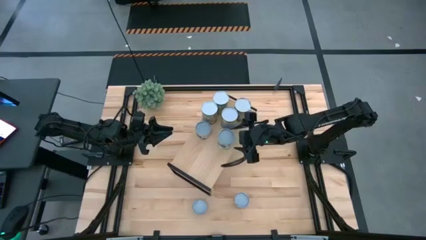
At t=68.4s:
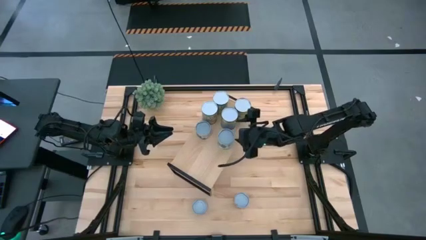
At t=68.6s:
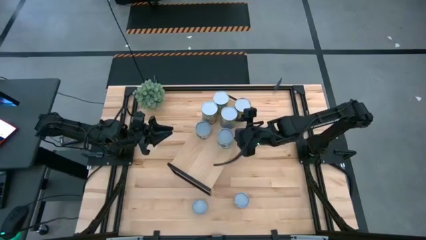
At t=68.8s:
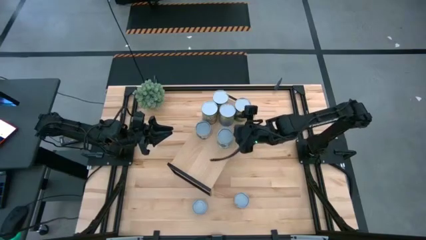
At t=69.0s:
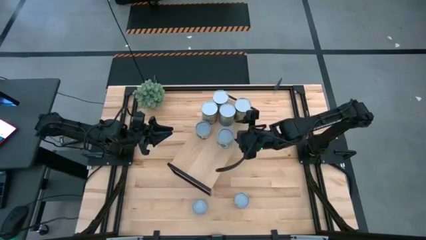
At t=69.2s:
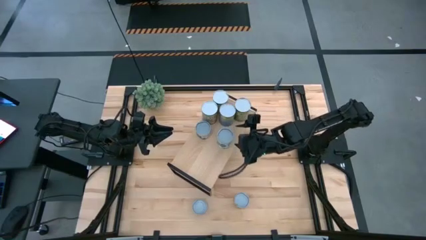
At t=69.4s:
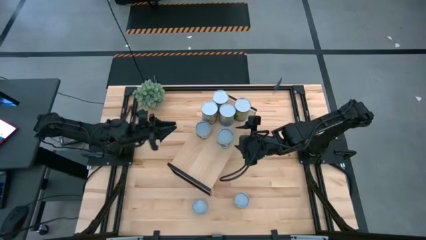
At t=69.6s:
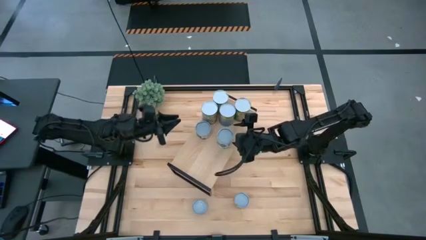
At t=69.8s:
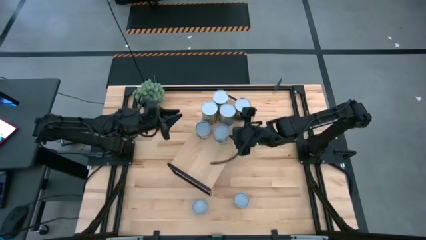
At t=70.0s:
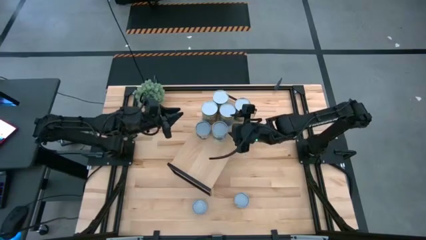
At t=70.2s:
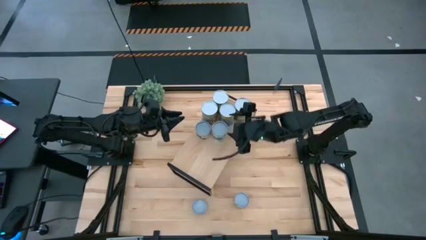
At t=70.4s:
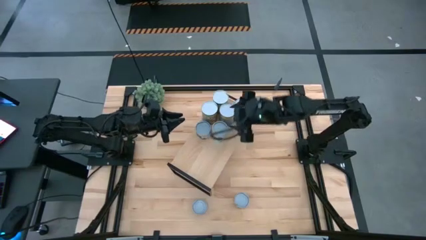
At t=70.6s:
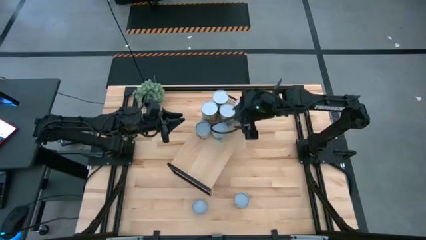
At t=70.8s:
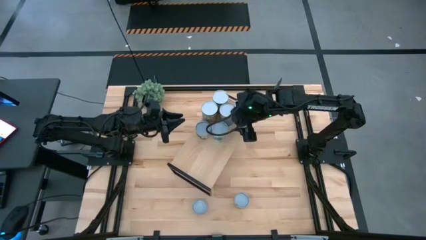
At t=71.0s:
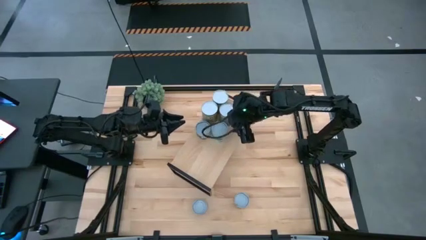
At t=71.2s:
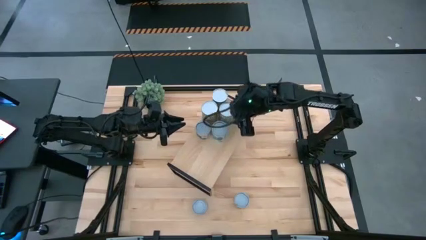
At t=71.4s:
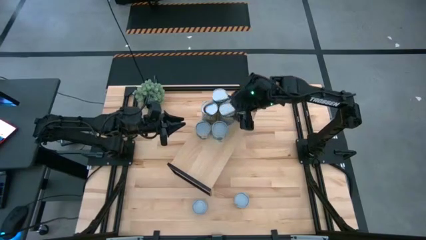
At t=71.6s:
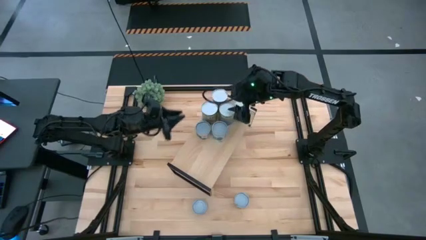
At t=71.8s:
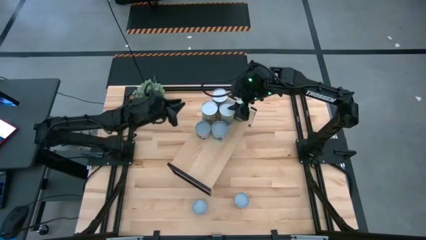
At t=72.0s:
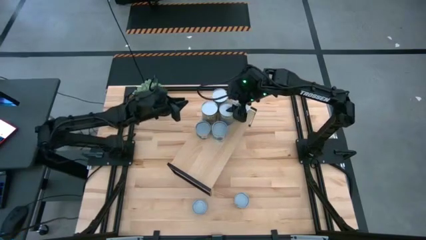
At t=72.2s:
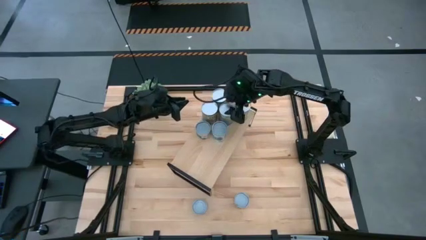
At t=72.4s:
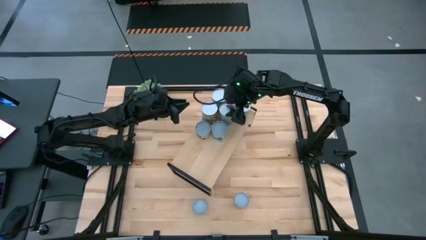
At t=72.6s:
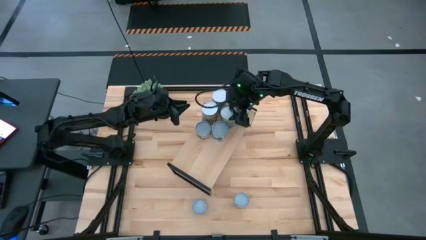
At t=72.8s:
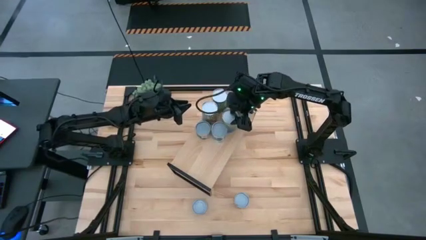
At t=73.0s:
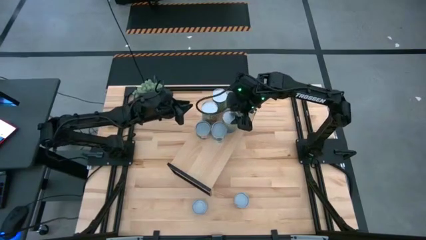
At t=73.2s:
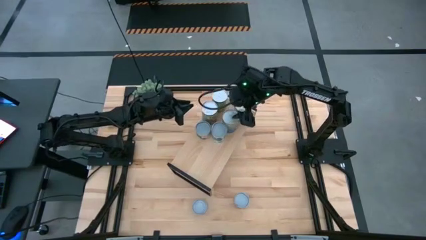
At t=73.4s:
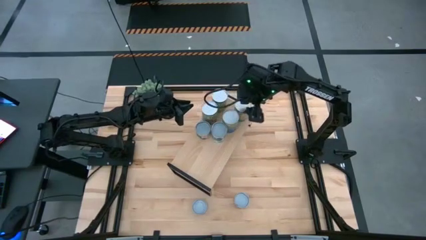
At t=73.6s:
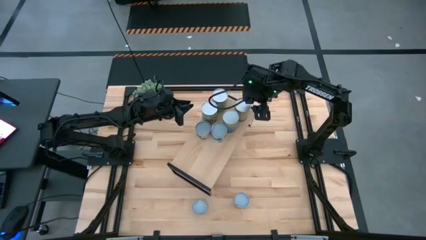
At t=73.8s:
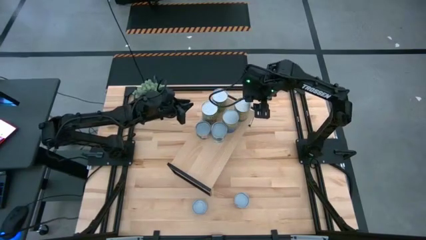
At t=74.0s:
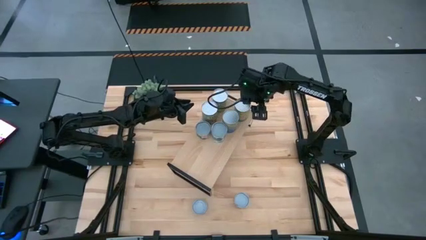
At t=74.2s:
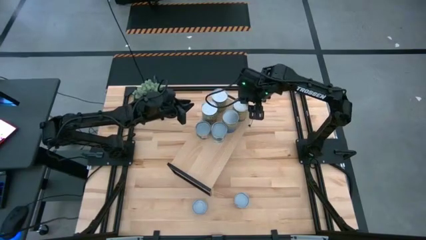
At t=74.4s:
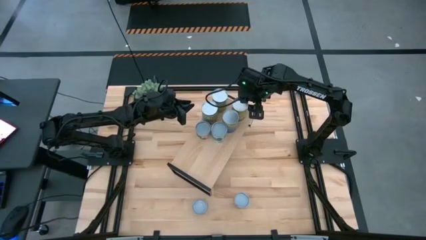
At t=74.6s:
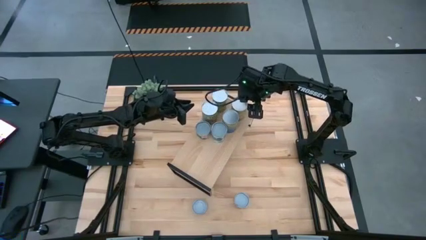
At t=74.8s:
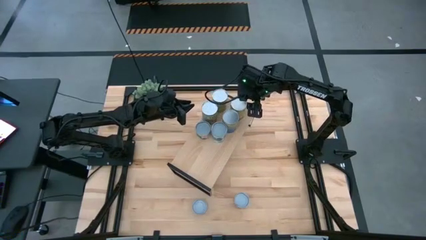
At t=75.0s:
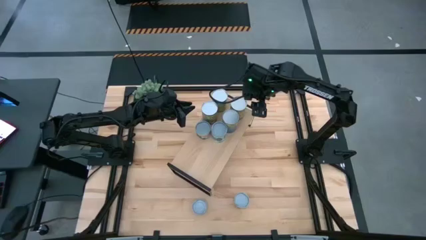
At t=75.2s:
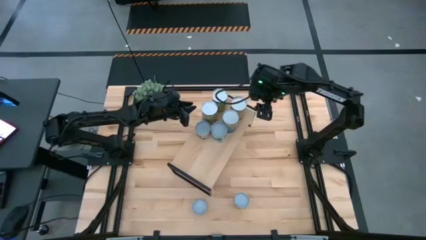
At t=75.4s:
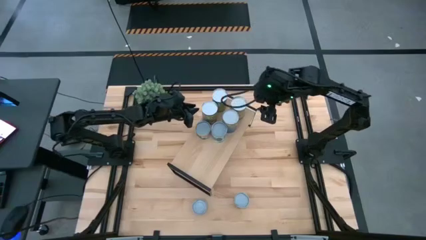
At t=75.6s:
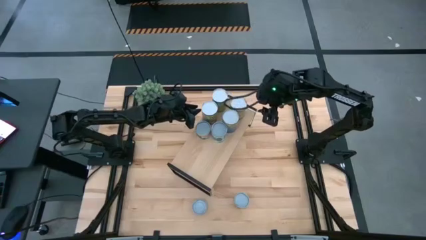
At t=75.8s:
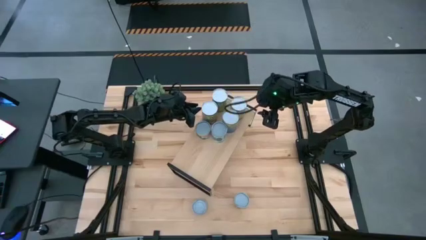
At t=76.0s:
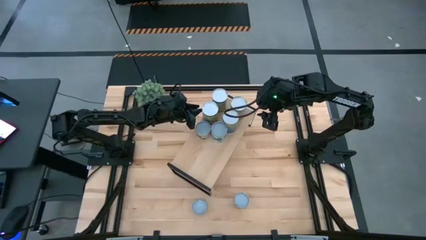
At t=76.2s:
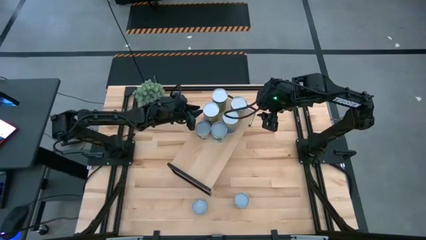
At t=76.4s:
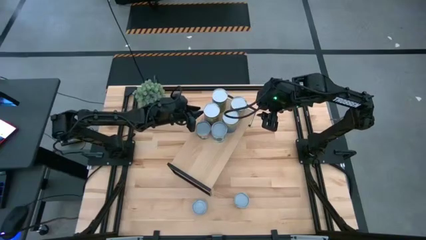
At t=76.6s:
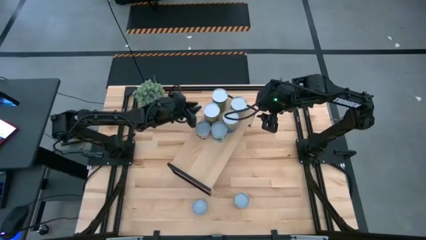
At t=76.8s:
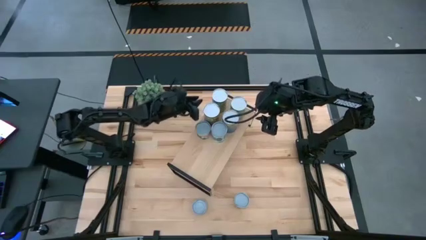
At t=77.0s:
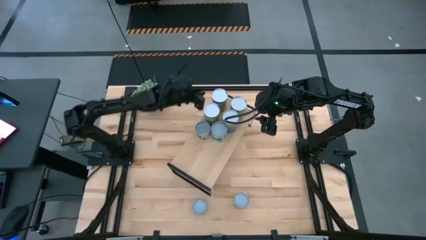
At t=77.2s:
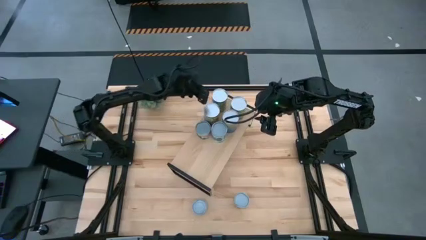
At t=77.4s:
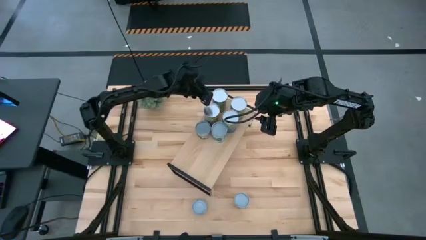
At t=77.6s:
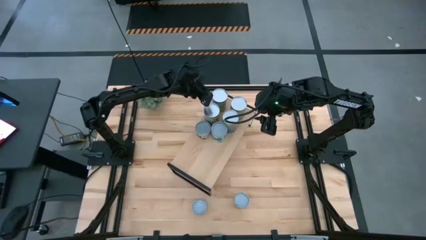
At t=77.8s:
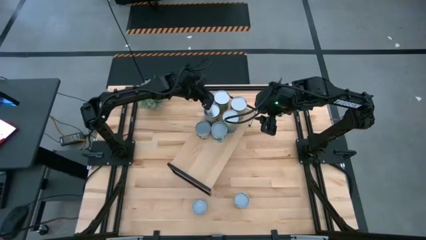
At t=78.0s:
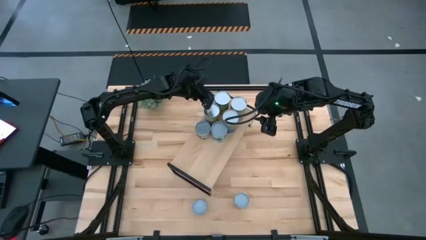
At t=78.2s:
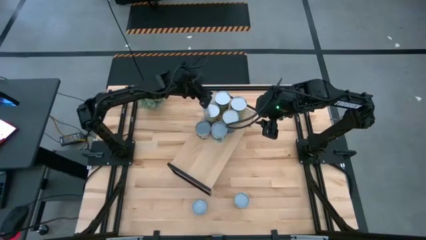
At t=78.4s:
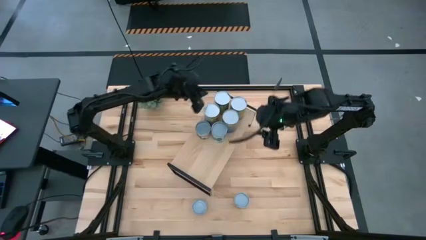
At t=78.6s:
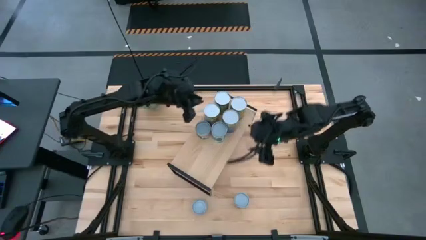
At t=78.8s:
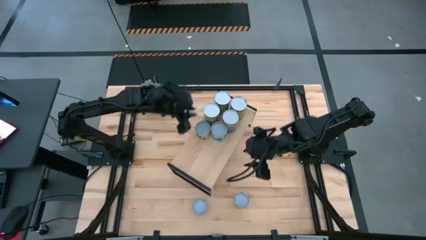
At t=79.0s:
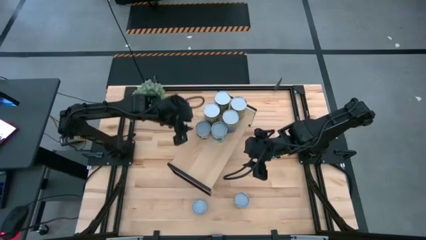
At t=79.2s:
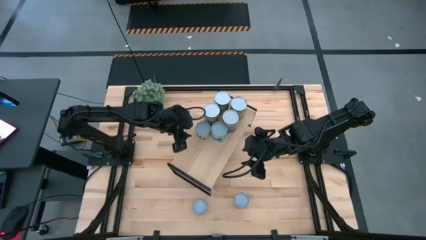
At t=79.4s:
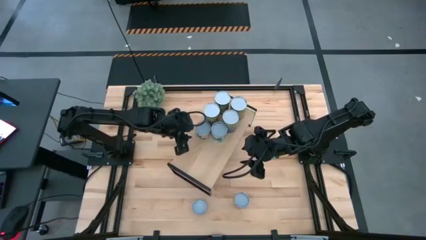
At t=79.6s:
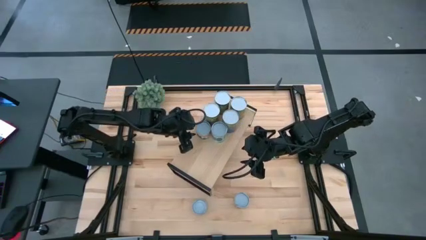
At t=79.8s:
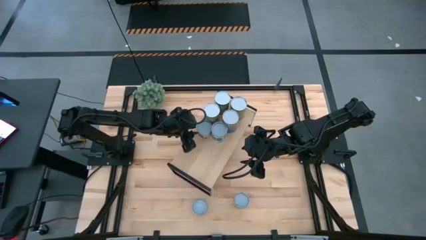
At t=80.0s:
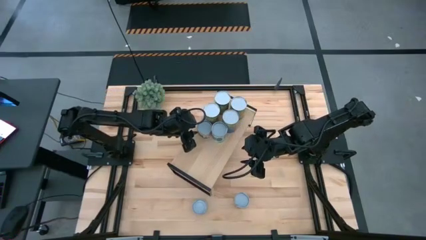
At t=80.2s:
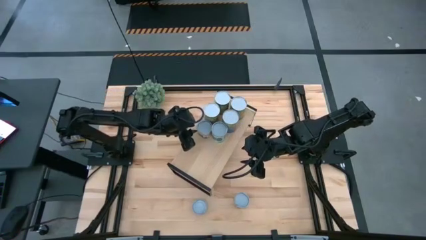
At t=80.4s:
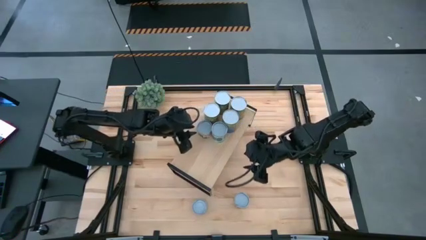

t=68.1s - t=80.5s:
Task: Pick and place cans onto a shelf
Adjust the cans on the shelf

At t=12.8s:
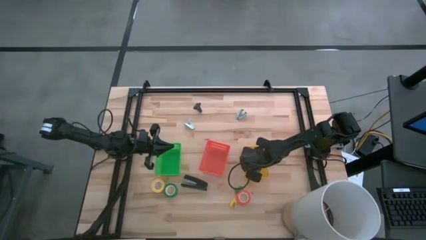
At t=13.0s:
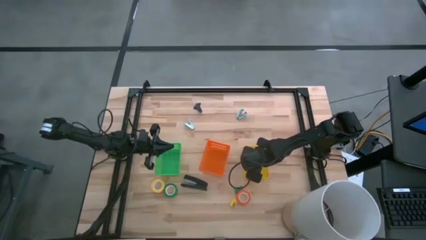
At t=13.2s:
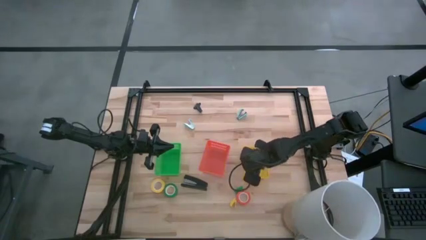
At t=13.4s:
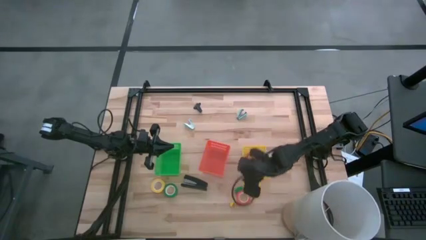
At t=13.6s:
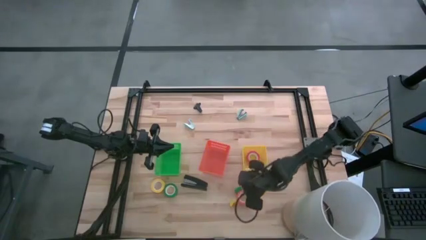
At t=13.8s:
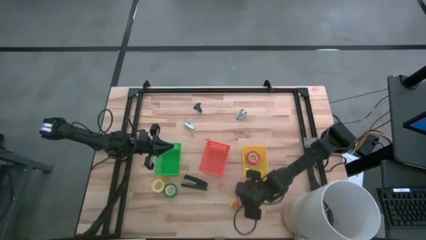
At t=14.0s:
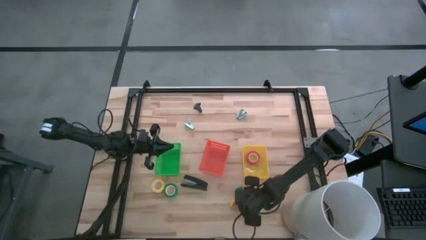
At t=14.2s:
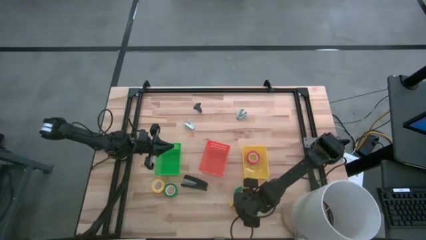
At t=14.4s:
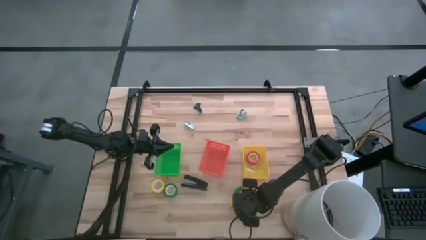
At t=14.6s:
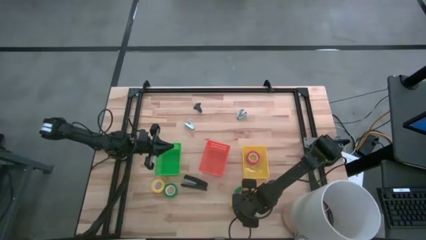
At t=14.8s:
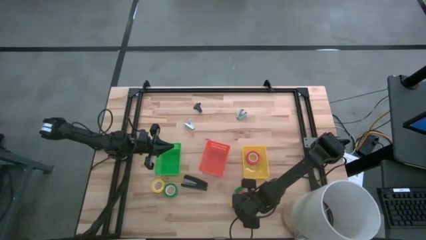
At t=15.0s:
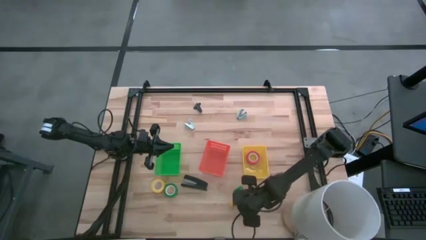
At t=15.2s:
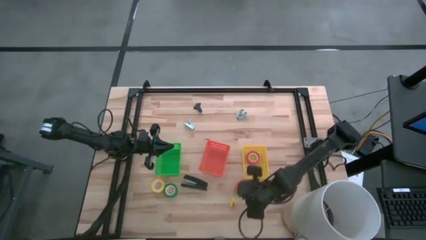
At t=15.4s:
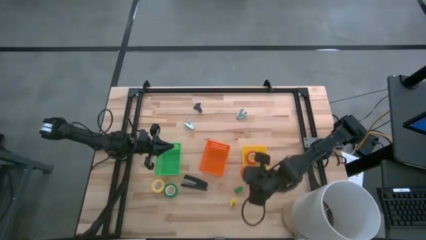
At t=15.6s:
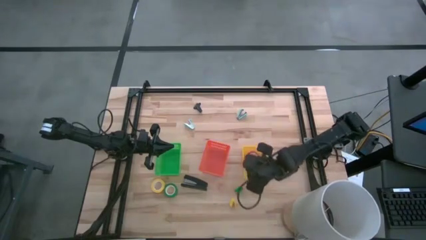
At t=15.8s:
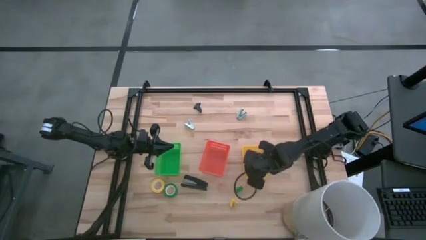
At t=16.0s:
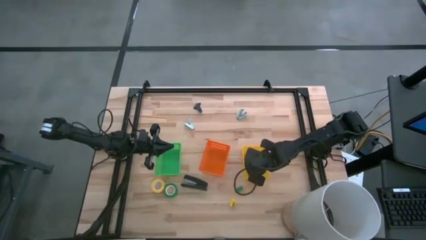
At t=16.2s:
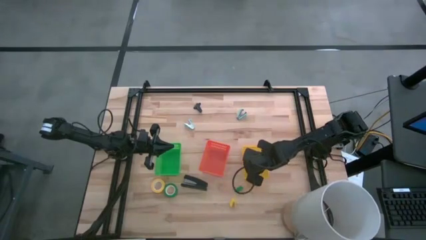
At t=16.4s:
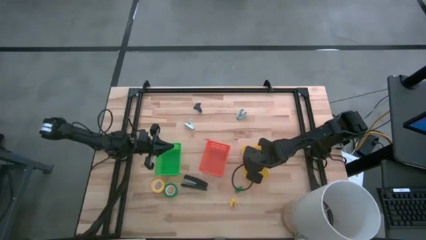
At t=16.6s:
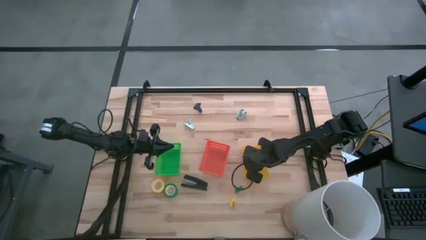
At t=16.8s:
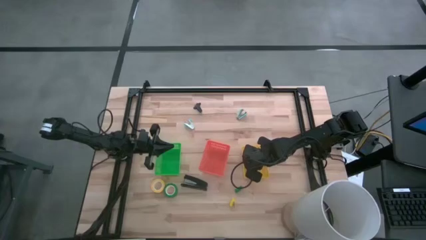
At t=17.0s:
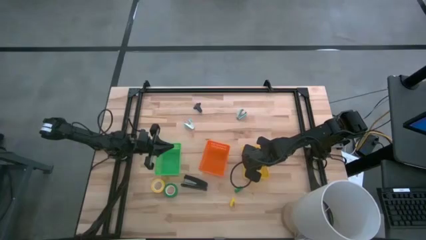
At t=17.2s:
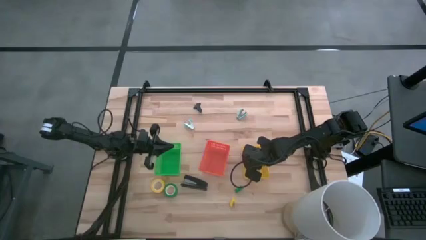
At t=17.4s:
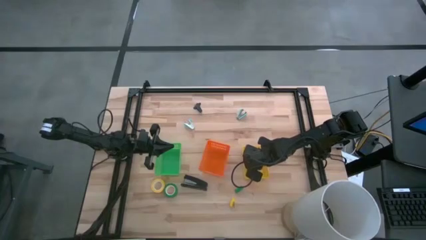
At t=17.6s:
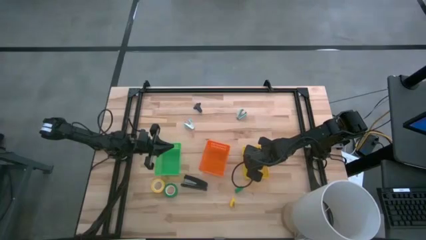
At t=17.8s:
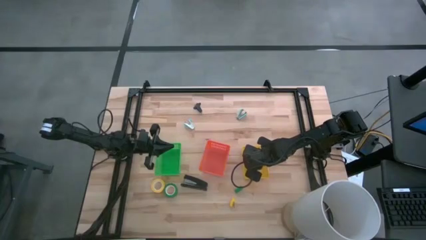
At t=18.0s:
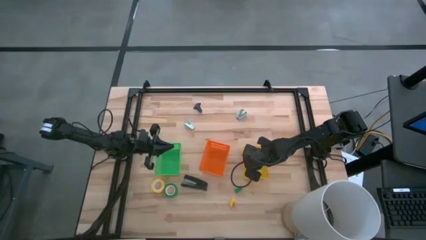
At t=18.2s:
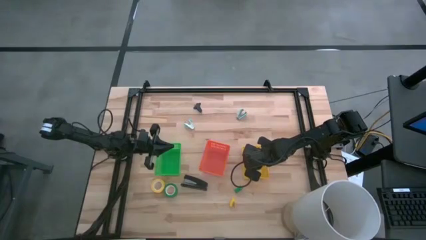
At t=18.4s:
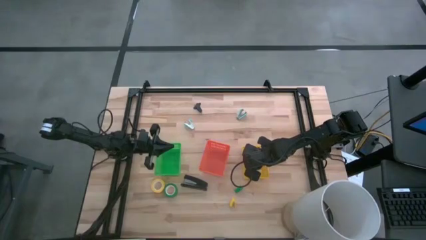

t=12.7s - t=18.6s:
Task: Pick and place Stapler, Stapler remover, tape
Put the orange tape into the yellow bin
